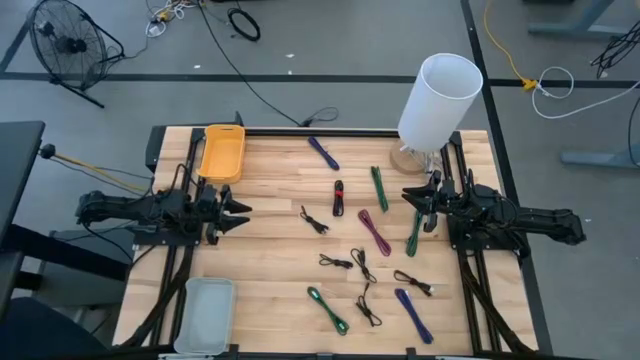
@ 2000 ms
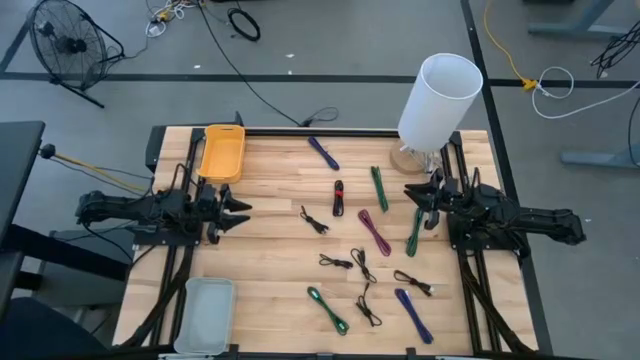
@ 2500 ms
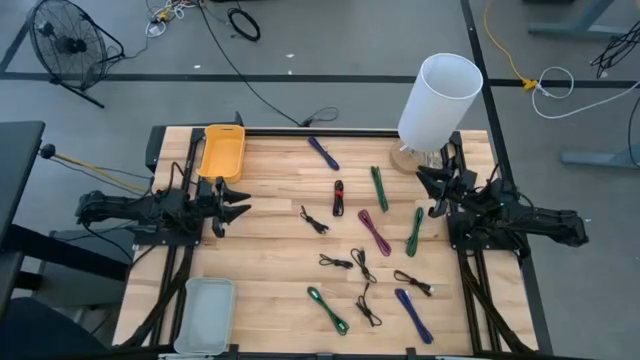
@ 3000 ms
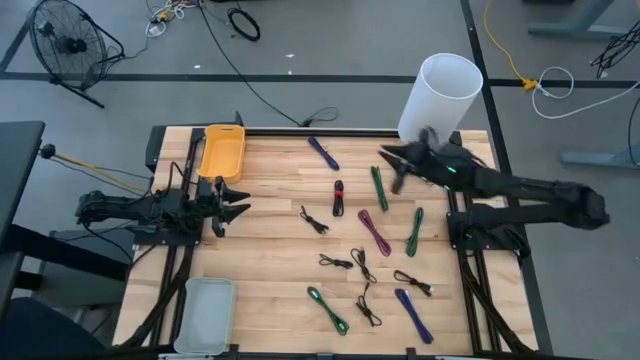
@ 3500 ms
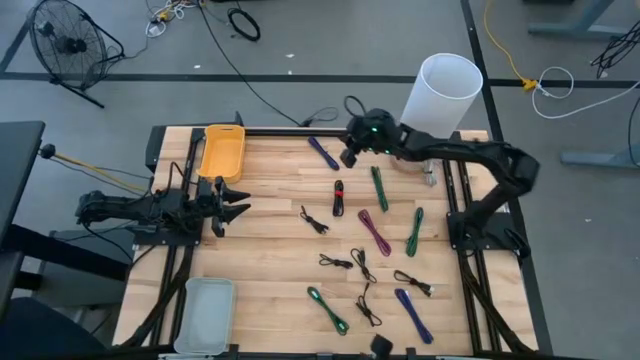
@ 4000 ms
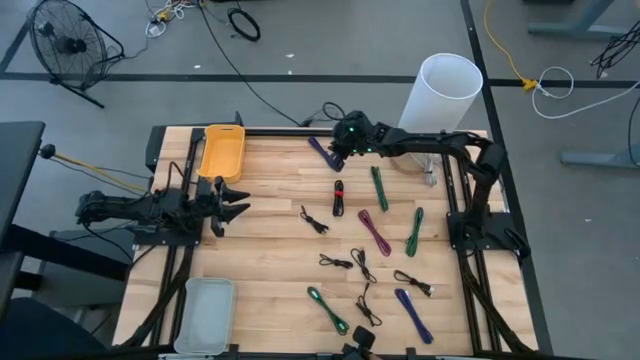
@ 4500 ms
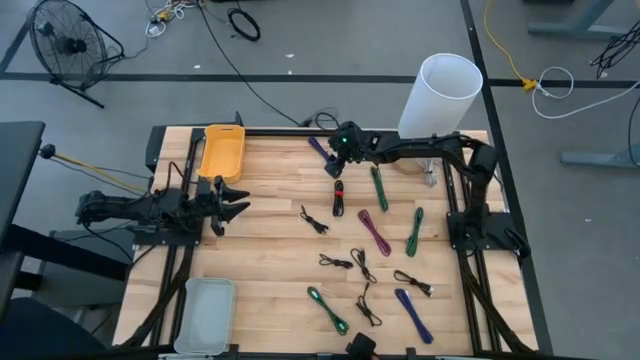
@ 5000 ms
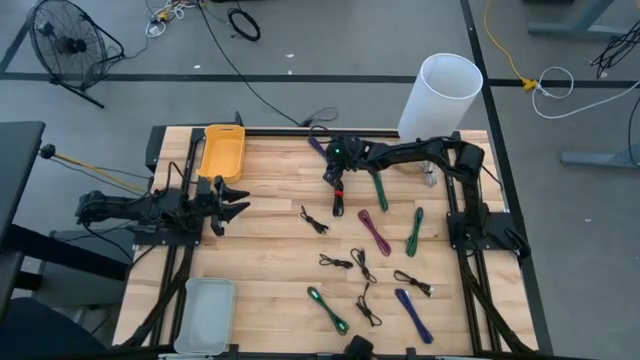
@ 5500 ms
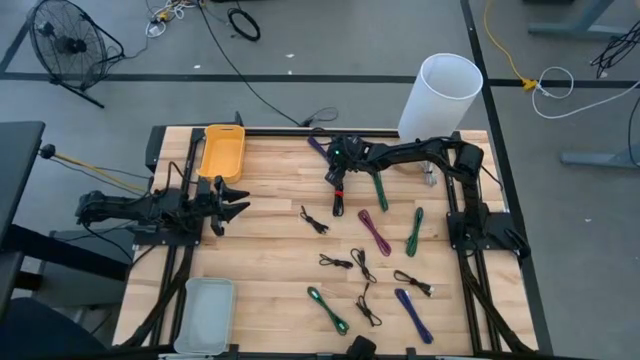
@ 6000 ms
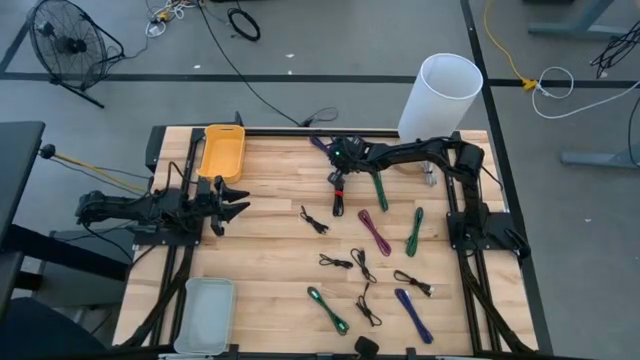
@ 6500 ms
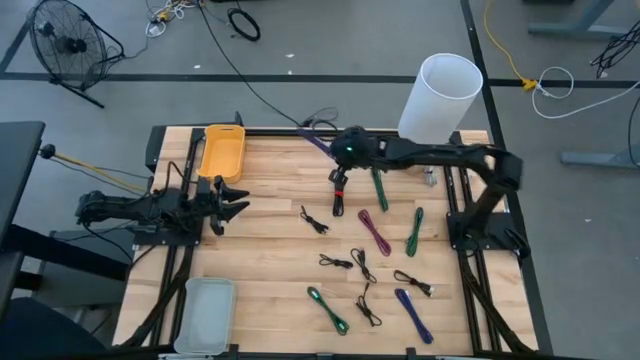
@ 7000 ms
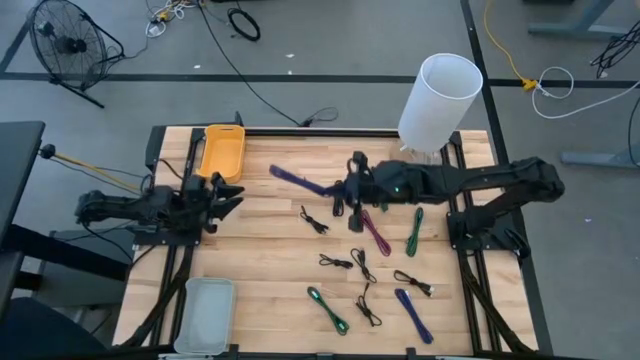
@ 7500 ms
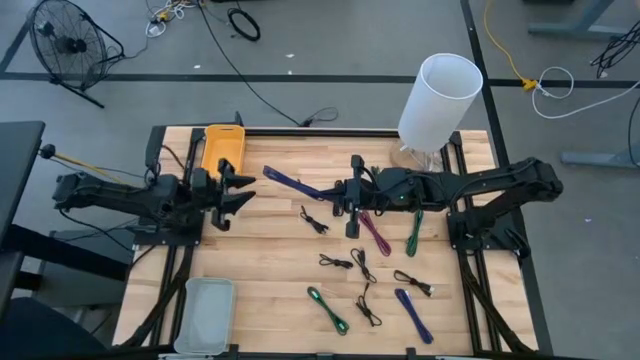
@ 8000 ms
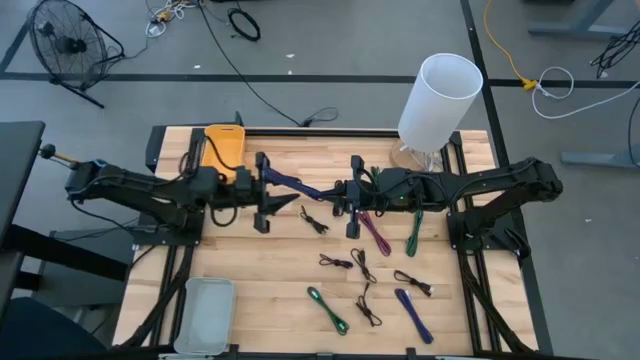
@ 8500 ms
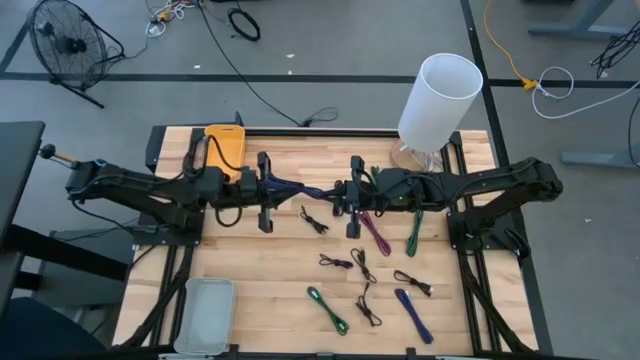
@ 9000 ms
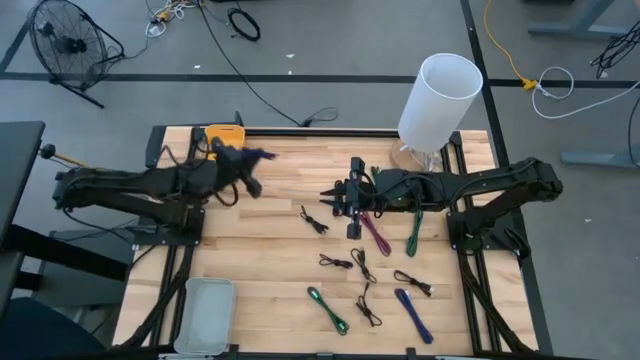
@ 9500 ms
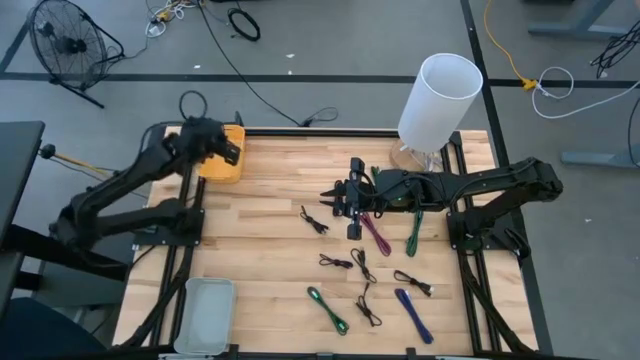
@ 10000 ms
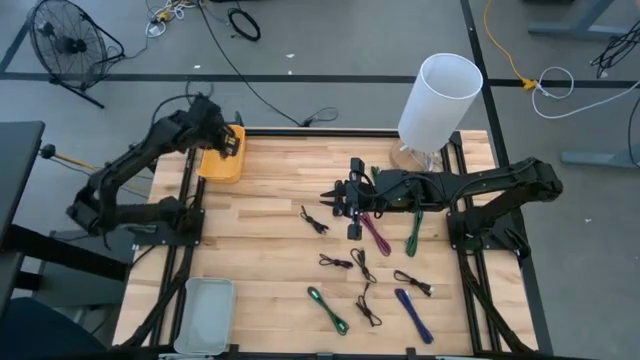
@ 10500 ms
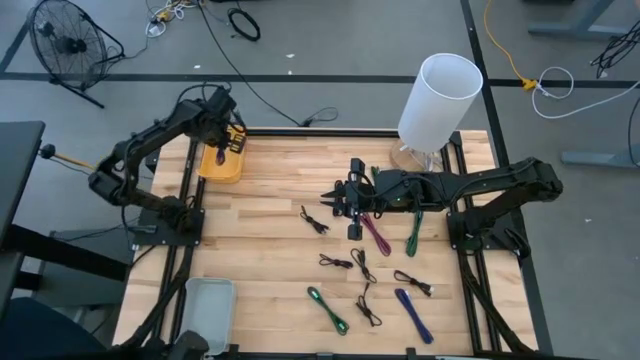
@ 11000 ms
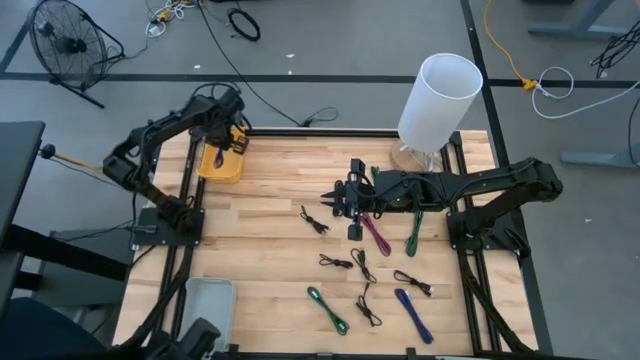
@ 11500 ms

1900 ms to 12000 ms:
Task: Pick & Place USB Port
Put the purple charger cable into the yellow bin

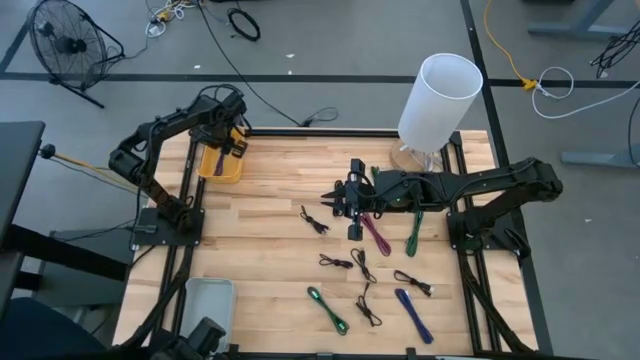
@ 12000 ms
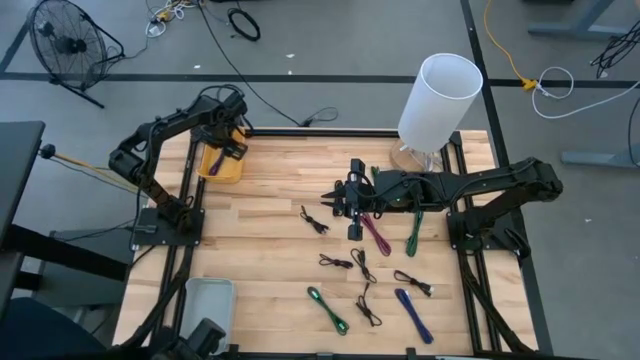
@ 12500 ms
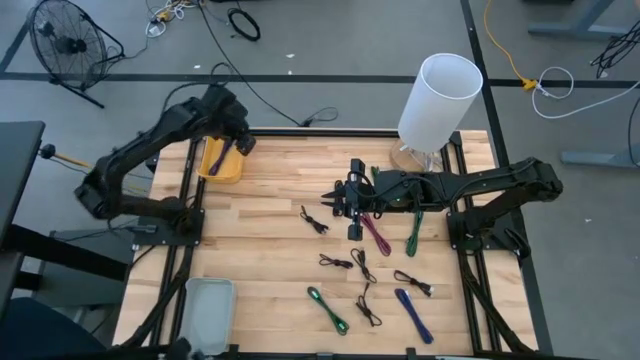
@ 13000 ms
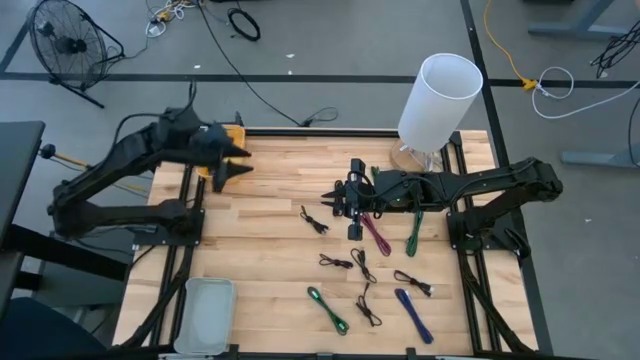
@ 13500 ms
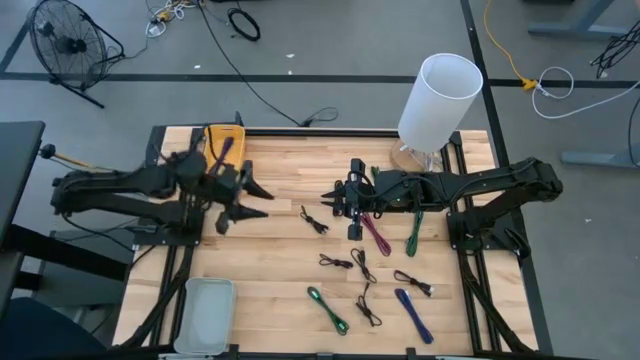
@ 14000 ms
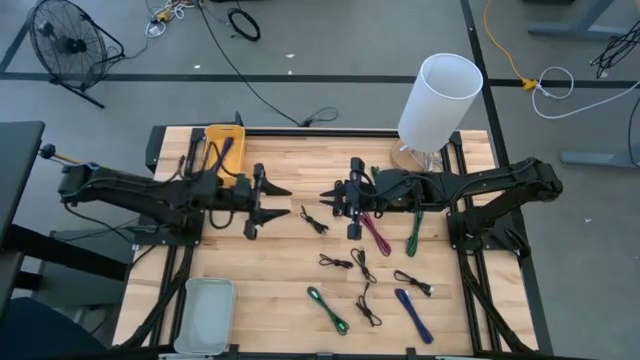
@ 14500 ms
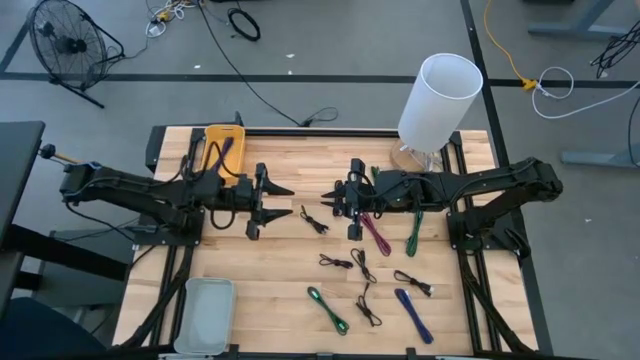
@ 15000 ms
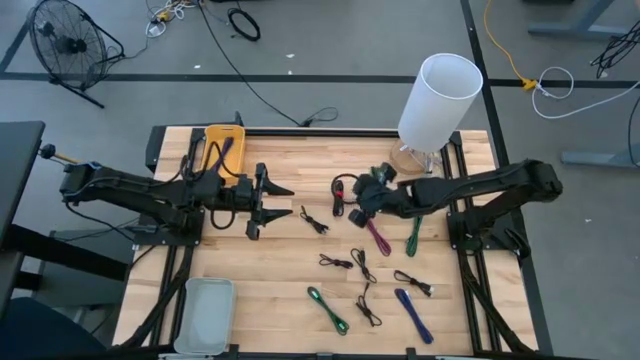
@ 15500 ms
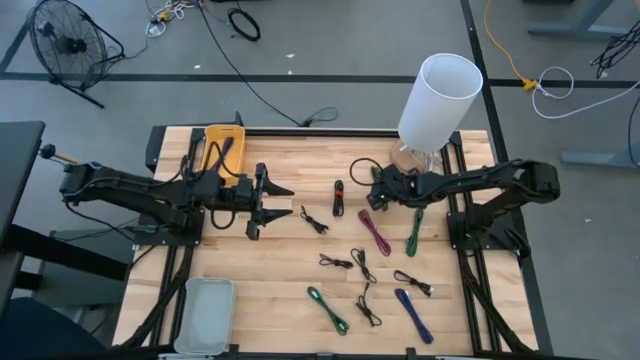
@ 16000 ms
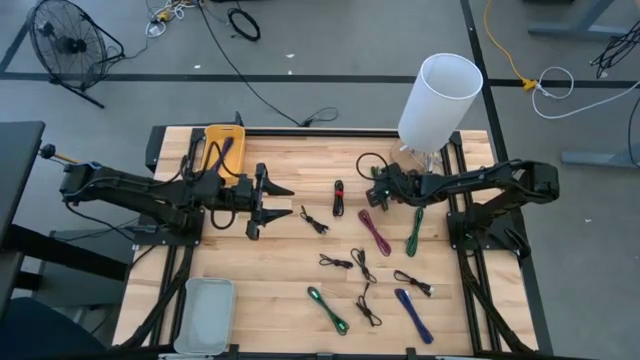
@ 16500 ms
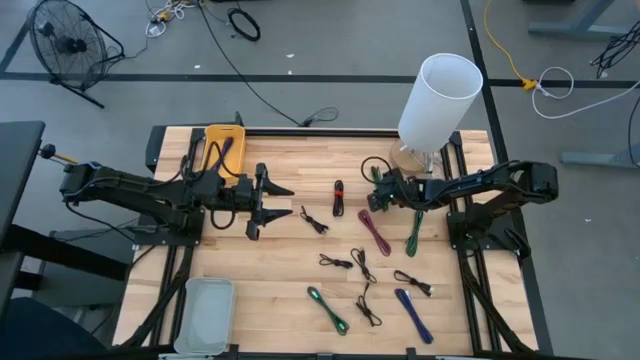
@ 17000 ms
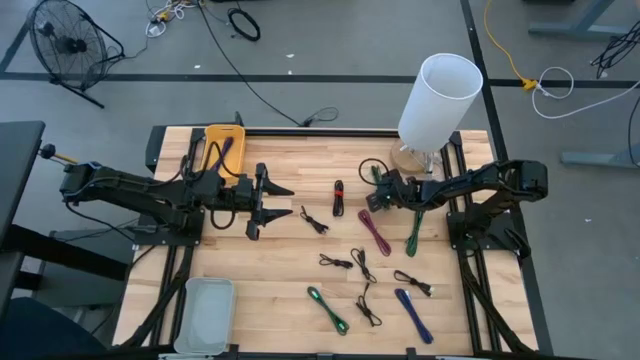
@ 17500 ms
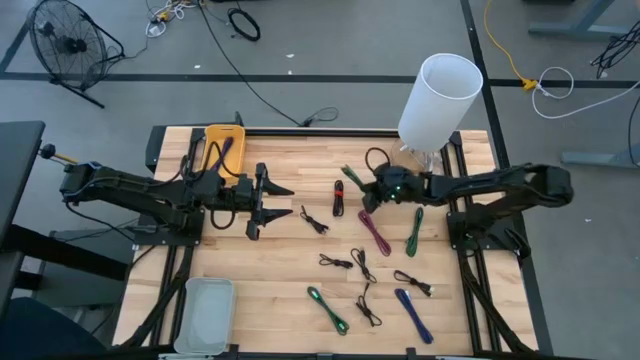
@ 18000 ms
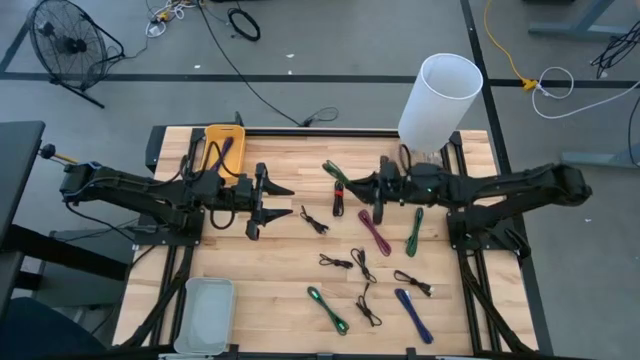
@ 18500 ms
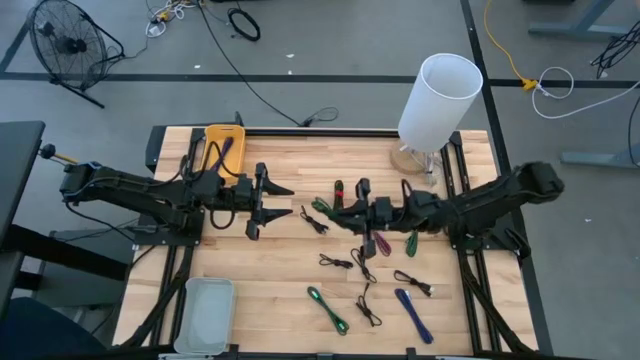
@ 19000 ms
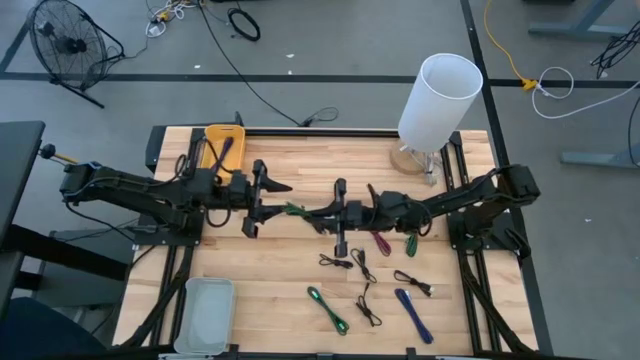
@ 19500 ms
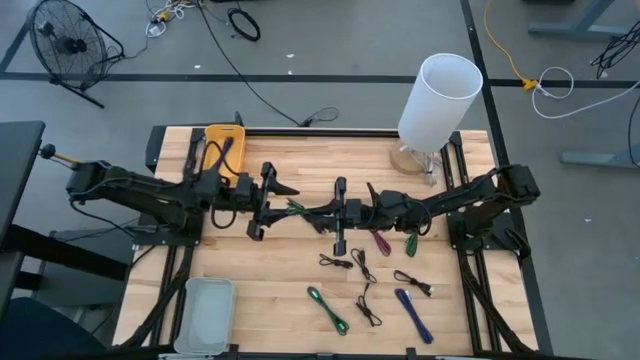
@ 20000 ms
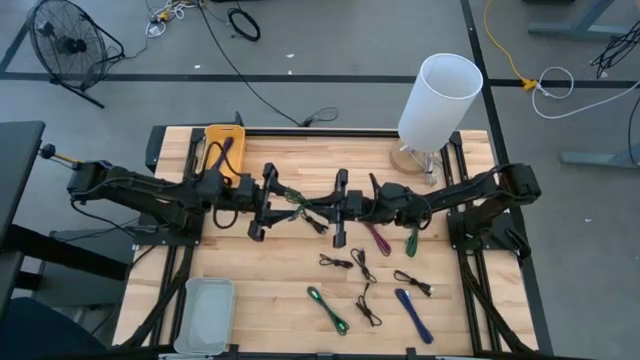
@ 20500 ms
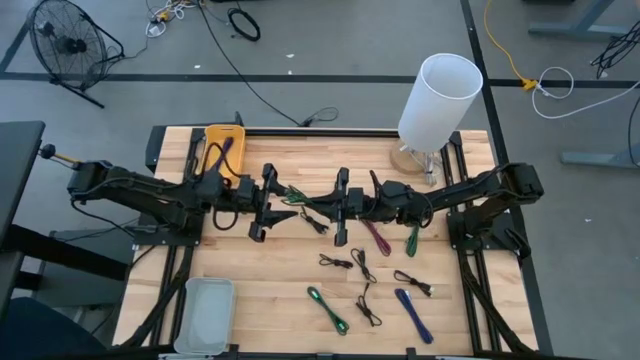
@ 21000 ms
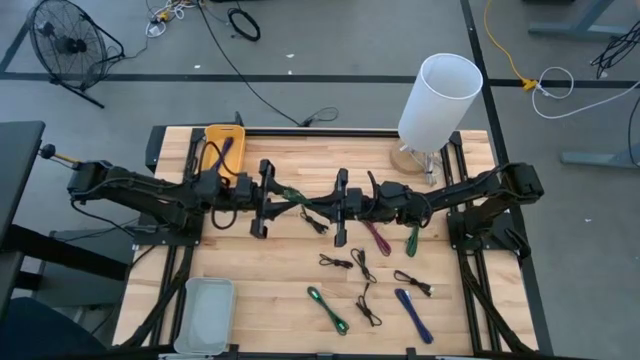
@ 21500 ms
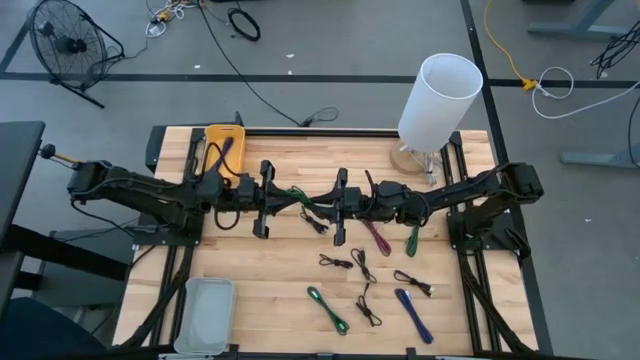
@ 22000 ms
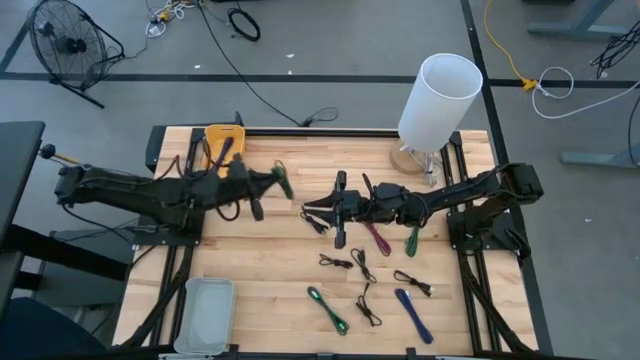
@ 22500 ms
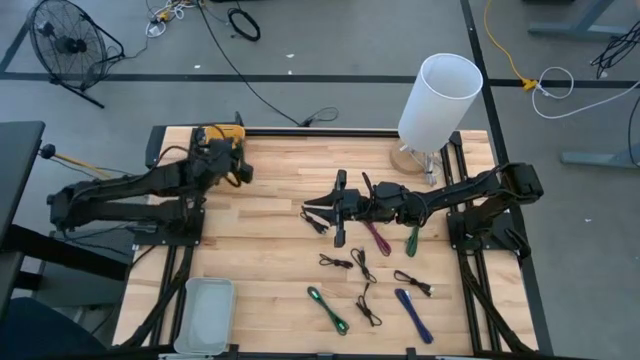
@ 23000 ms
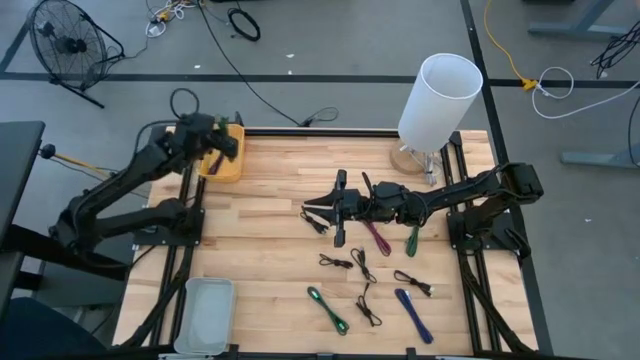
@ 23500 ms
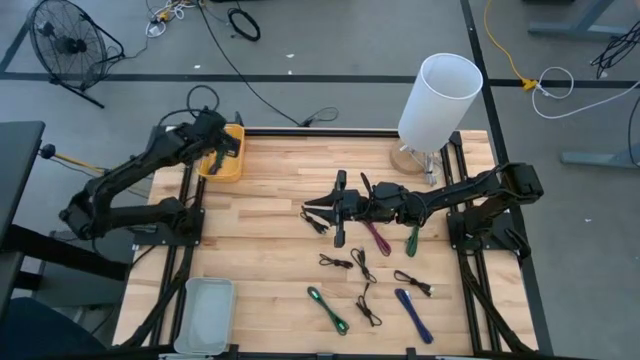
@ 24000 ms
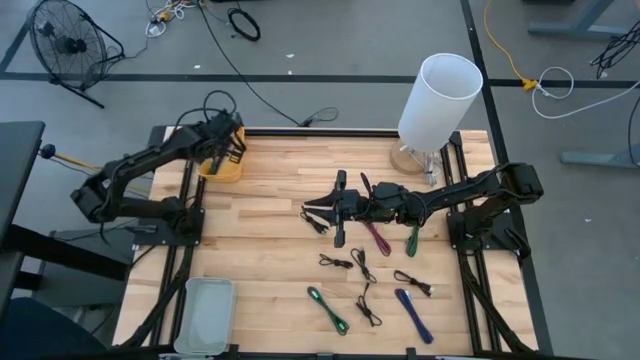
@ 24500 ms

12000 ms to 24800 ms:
Put the green charger cable into the yellow bin
